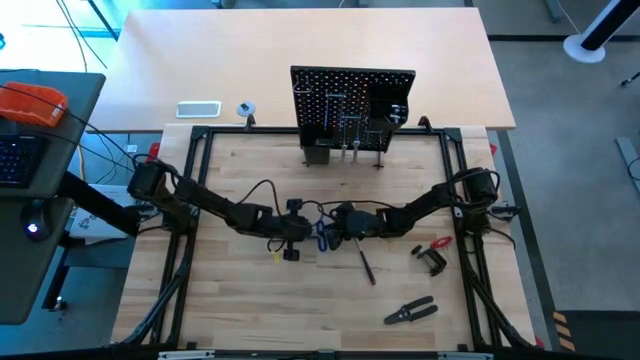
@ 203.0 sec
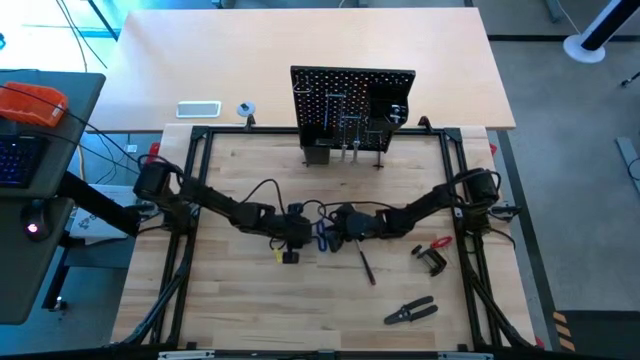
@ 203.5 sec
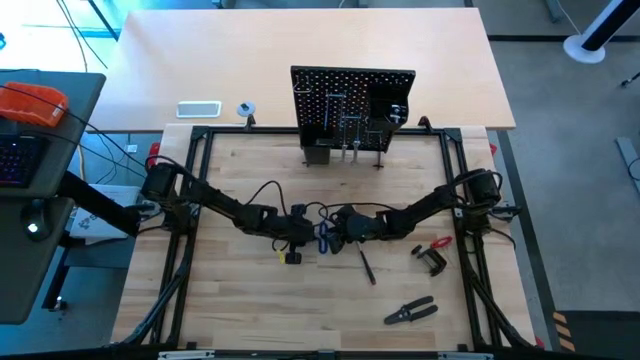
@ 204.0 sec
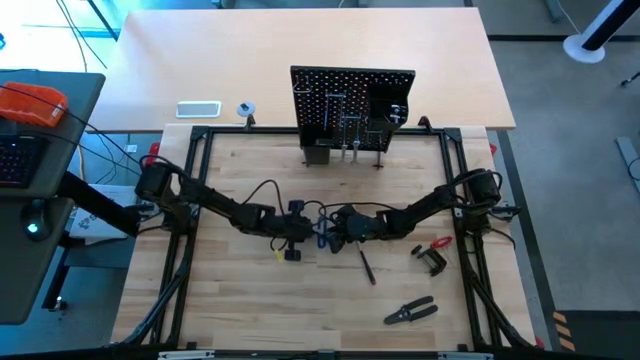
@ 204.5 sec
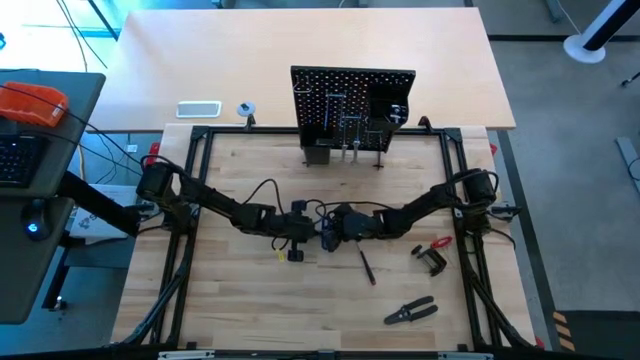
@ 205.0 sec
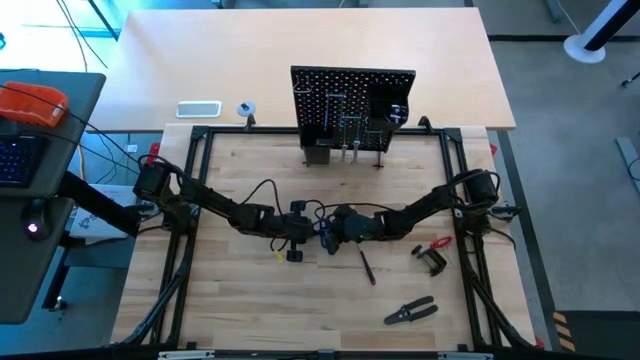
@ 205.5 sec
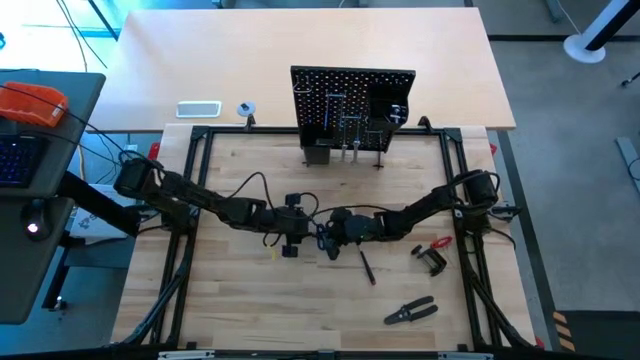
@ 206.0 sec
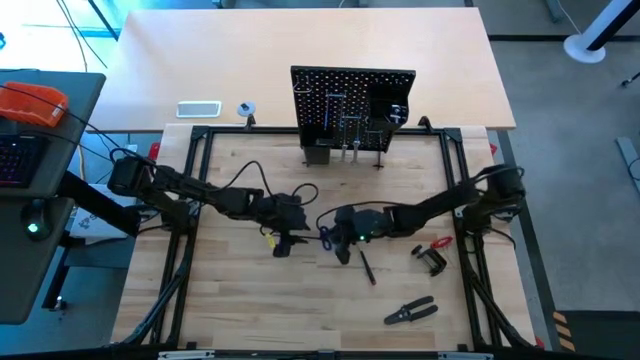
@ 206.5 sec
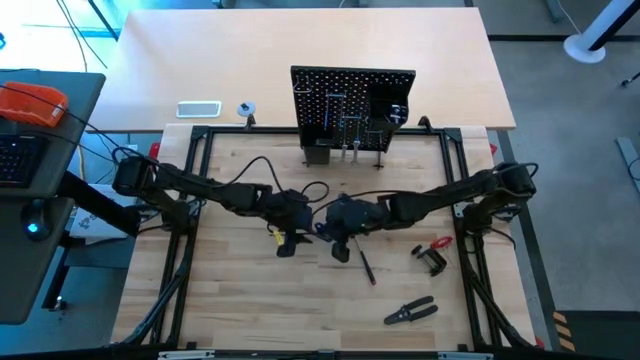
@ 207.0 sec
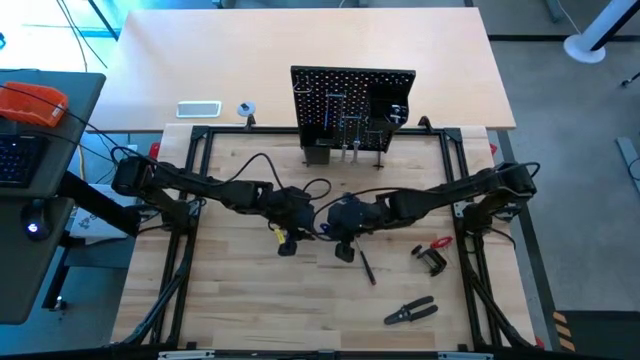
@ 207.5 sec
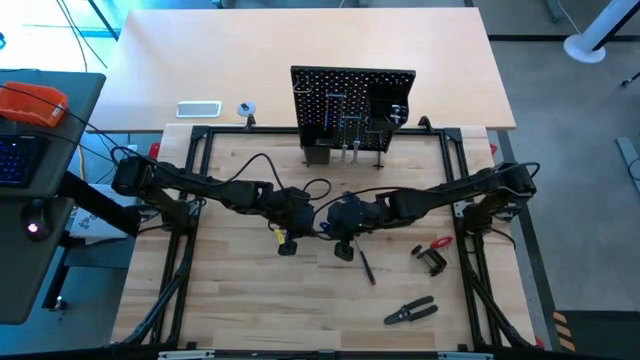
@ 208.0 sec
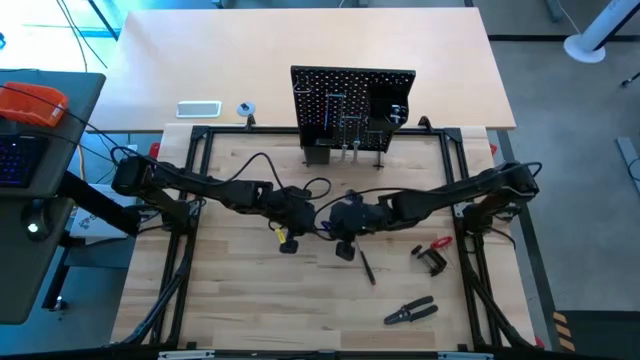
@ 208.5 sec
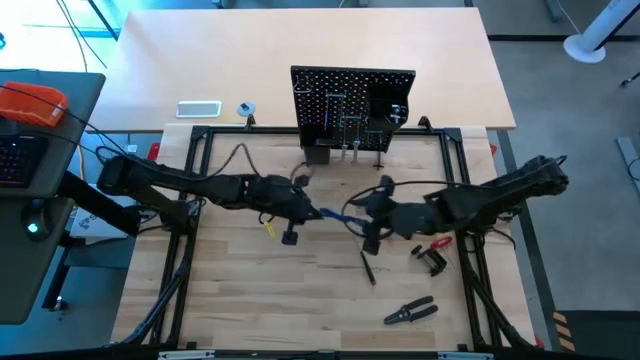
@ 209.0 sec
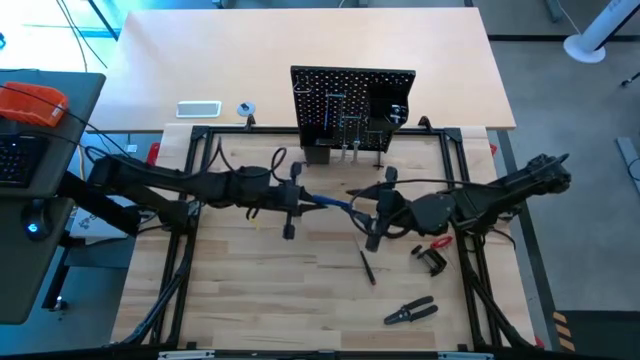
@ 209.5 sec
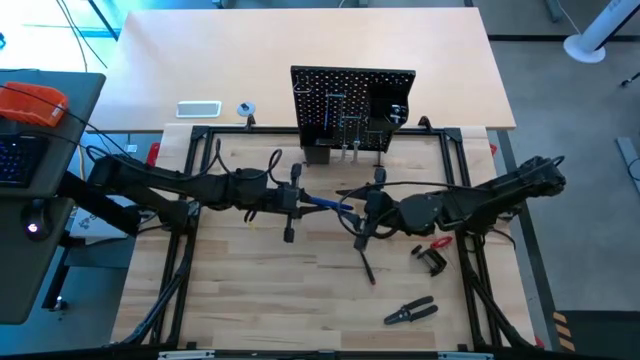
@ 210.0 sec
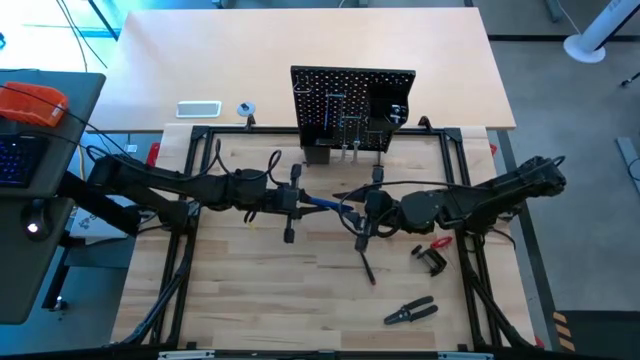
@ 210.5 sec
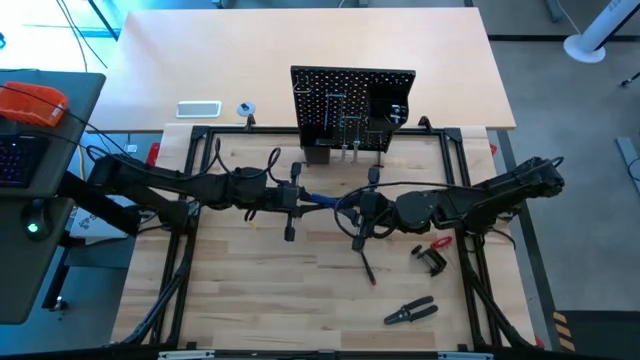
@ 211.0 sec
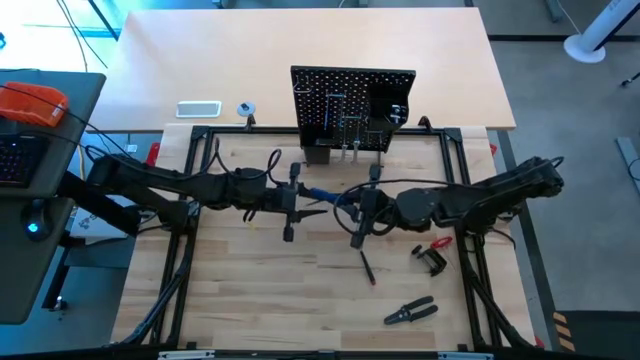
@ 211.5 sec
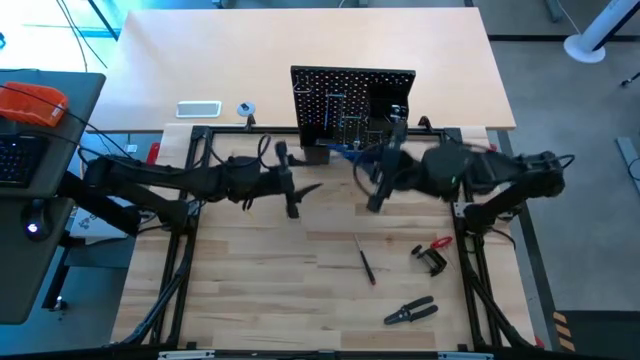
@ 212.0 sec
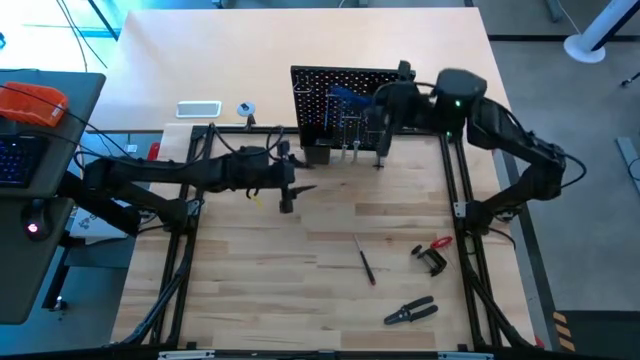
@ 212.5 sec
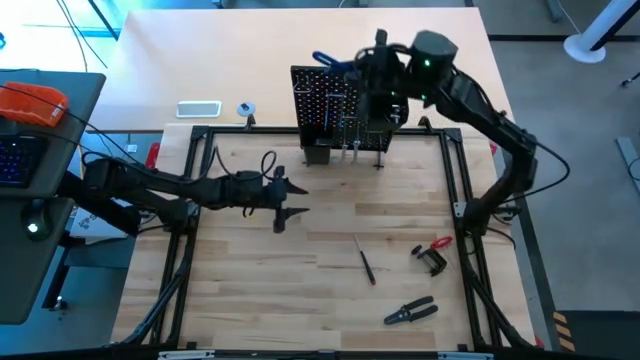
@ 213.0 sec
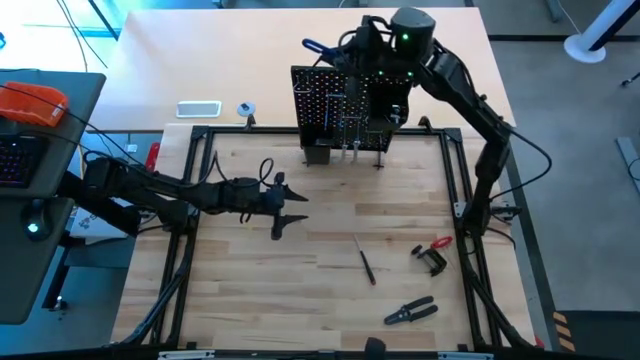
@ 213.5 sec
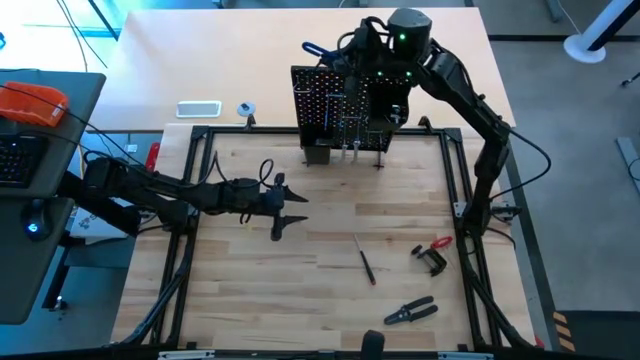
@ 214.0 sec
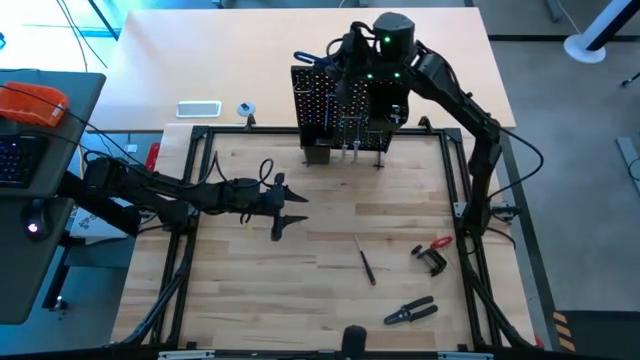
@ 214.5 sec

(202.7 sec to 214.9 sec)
Task: Hang tools onto peg board
Hang the spring puller on the pegboard

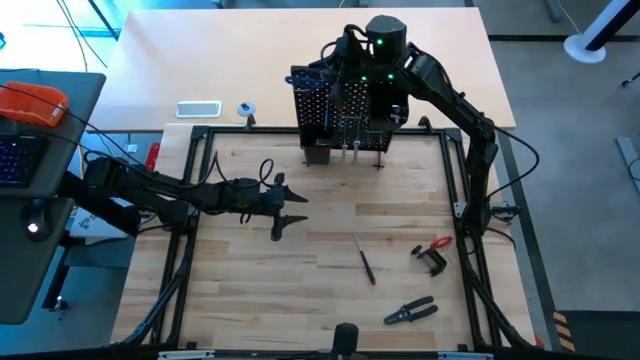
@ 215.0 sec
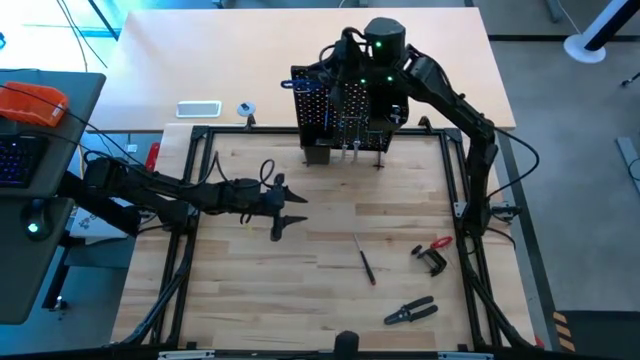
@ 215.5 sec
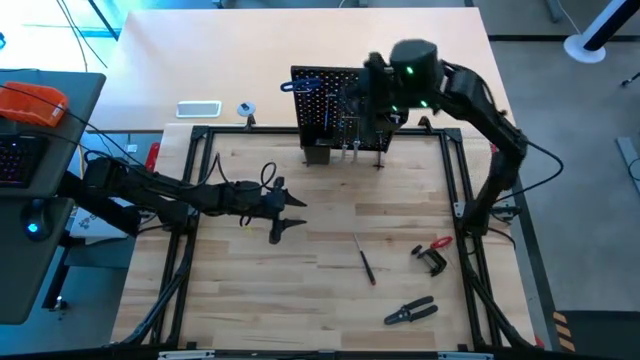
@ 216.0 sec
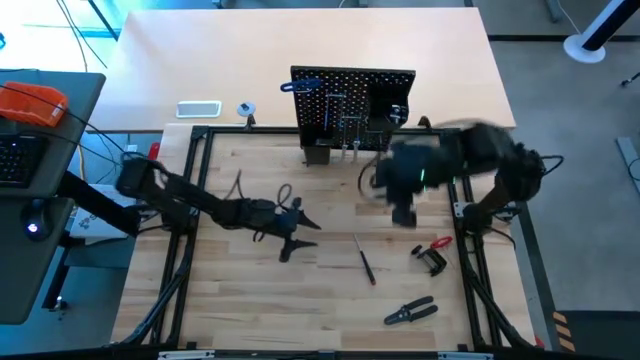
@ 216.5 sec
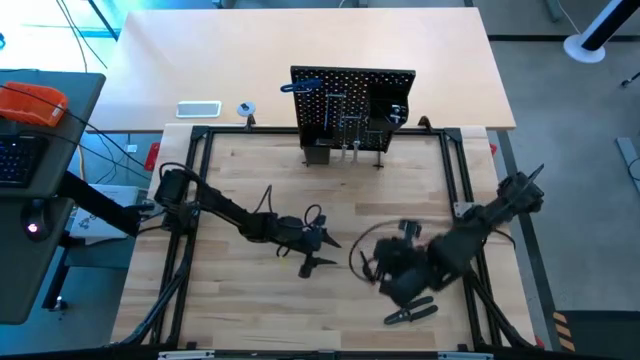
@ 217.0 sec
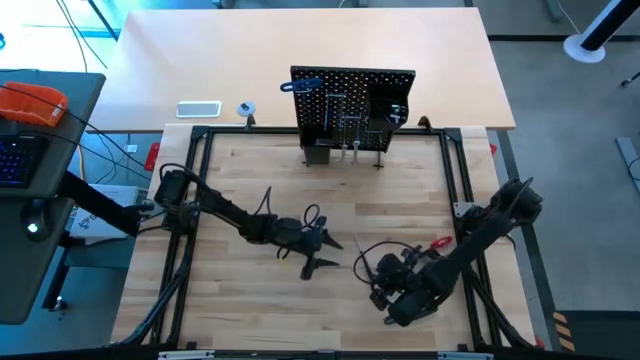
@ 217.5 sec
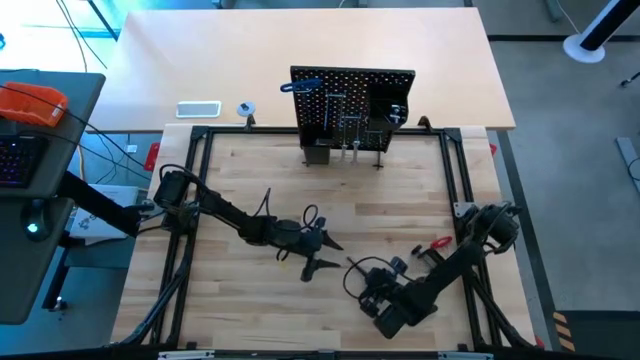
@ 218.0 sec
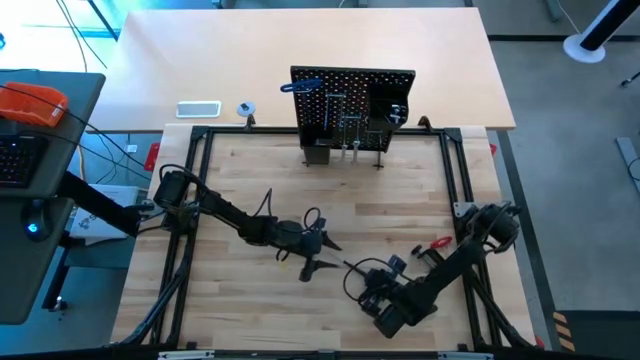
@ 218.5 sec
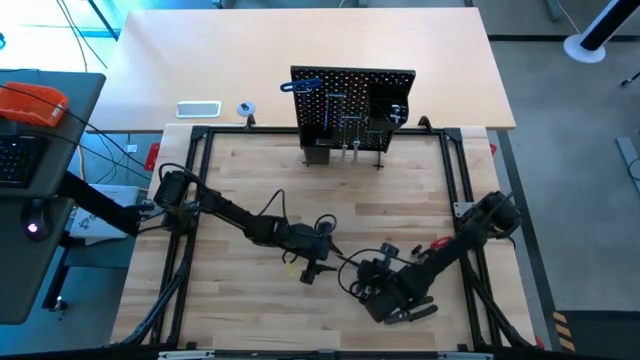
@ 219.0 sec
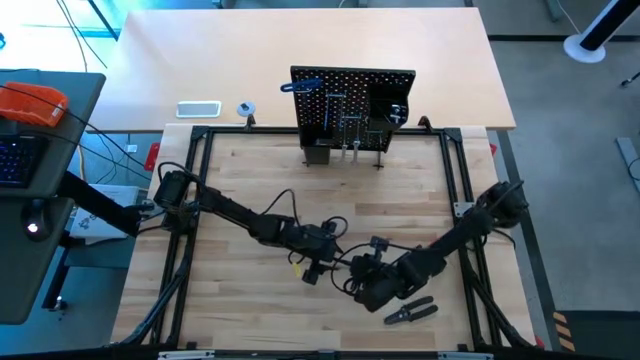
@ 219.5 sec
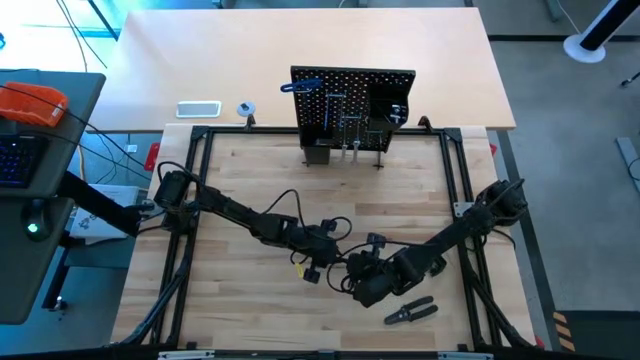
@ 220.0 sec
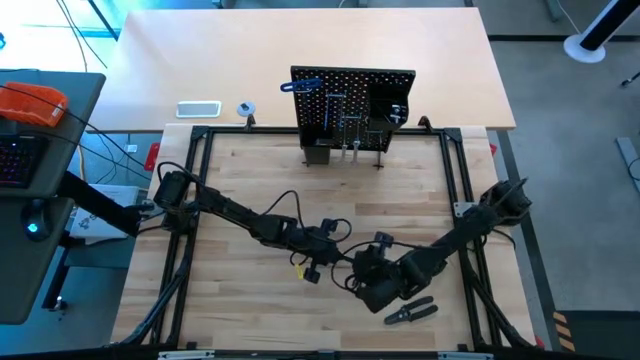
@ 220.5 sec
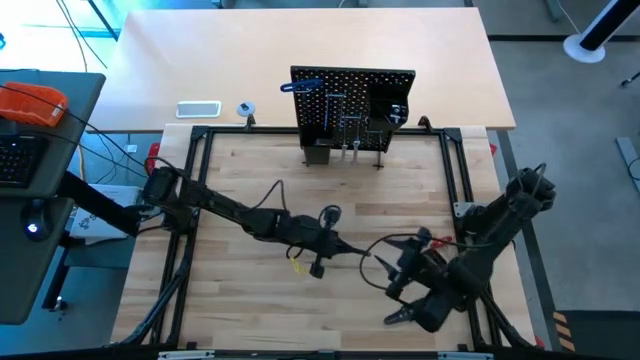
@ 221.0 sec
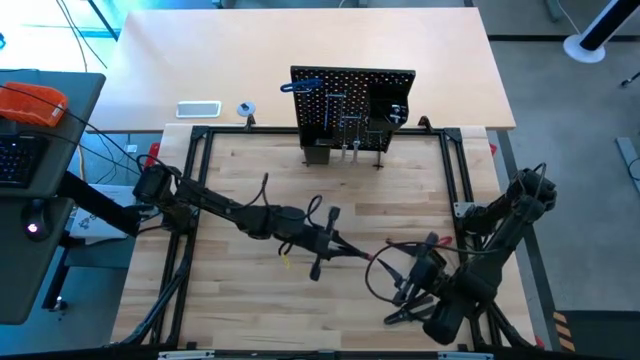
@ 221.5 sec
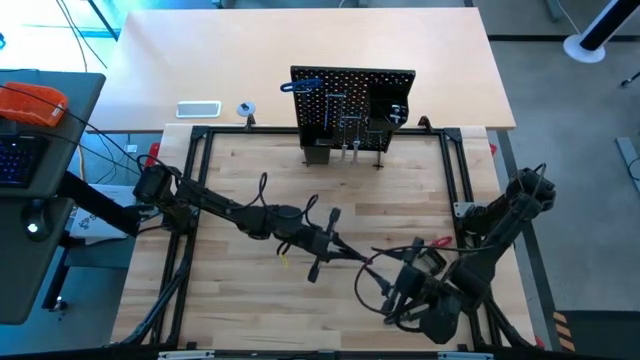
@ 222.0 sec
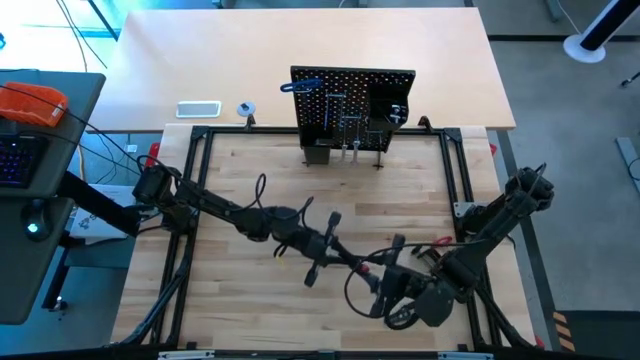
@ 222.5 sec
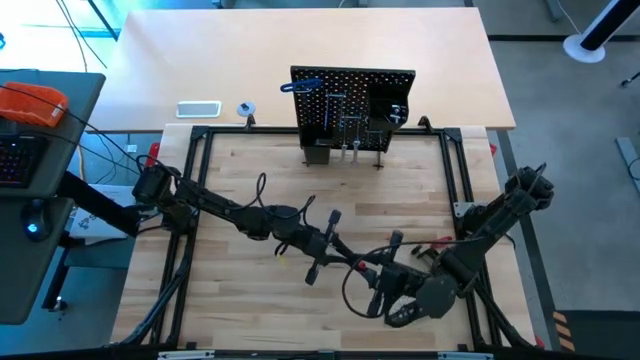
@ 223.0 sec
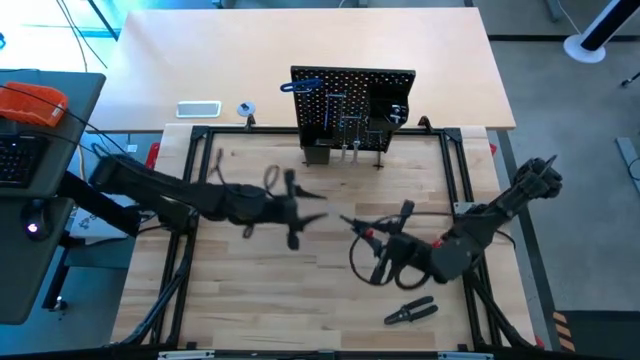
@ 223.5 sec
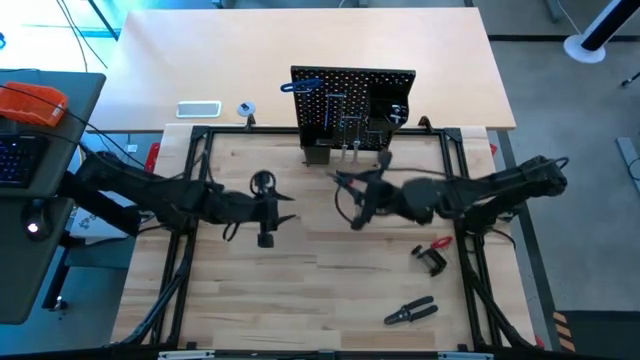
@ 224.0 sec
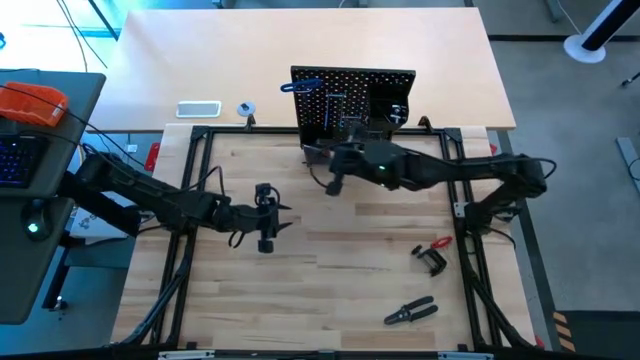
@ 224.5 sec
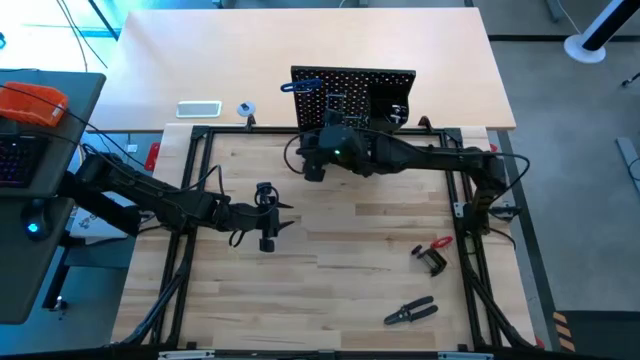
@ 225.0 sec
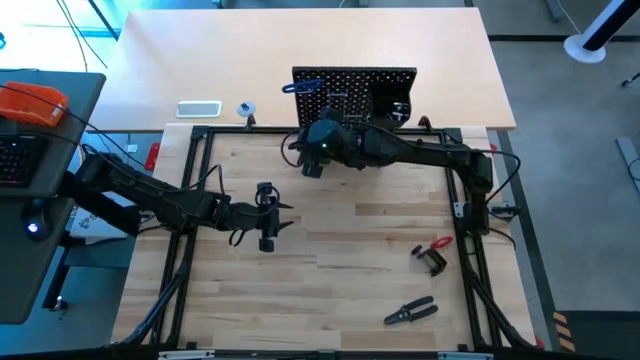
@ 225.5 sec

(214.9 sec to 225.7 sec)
Put the bradawl on the pegboard
